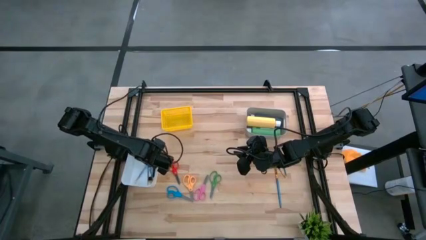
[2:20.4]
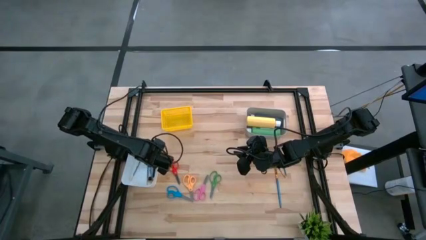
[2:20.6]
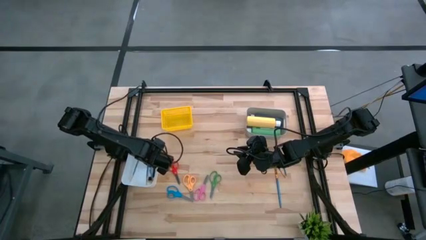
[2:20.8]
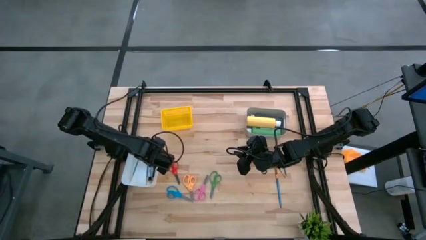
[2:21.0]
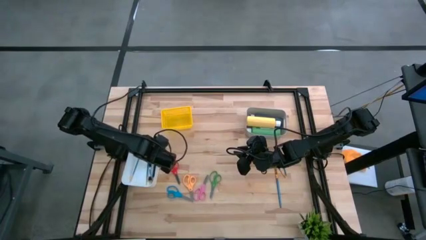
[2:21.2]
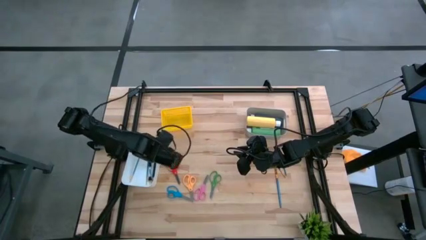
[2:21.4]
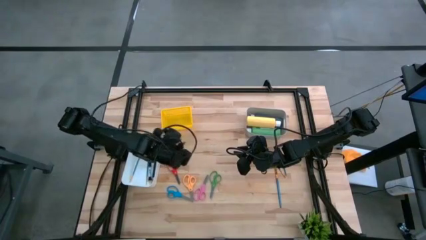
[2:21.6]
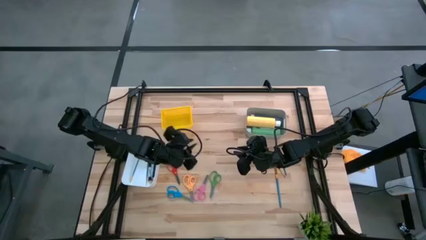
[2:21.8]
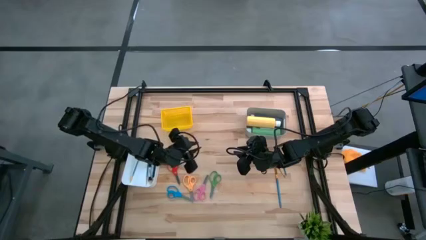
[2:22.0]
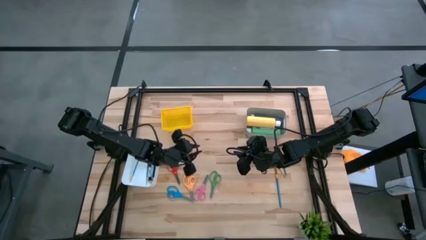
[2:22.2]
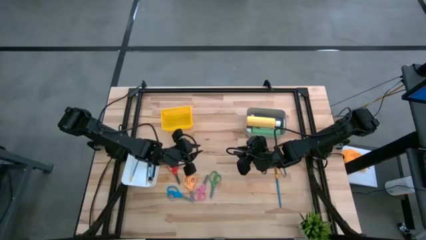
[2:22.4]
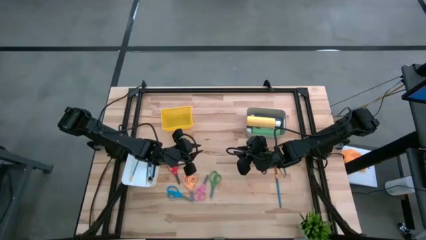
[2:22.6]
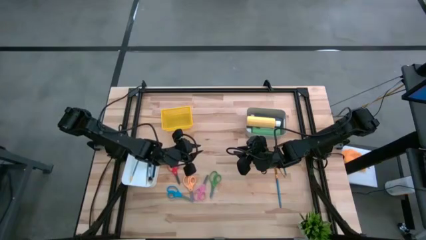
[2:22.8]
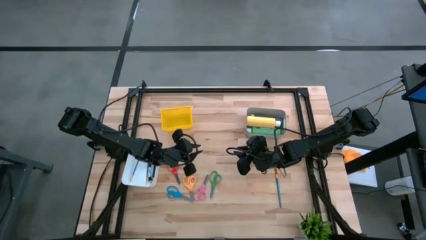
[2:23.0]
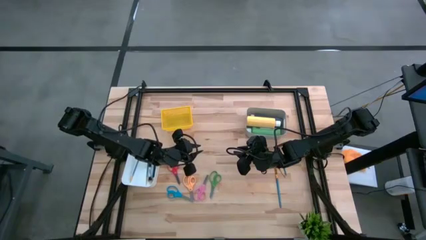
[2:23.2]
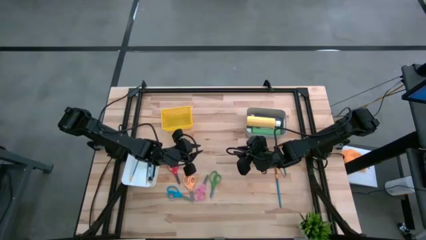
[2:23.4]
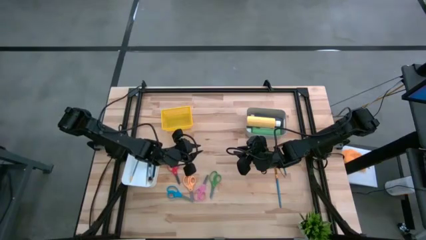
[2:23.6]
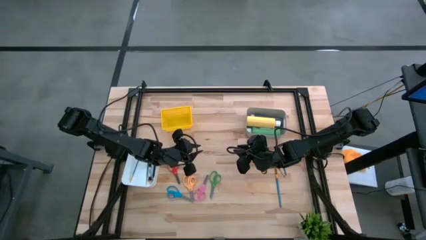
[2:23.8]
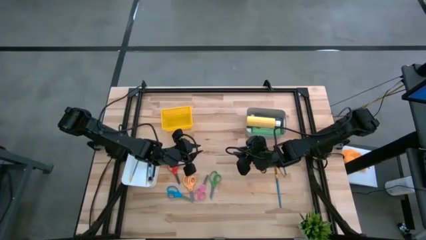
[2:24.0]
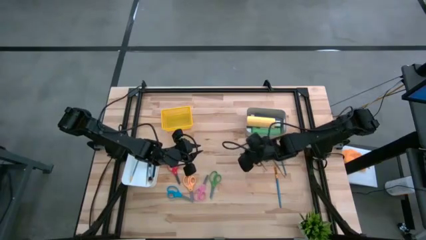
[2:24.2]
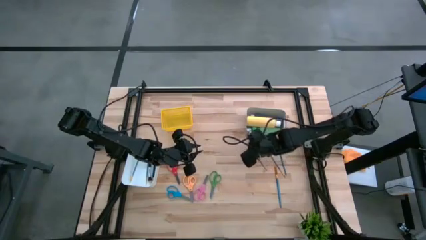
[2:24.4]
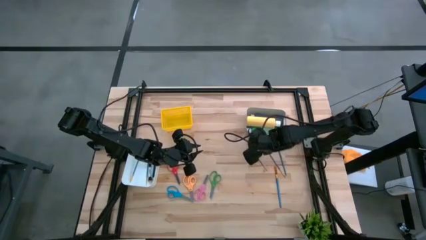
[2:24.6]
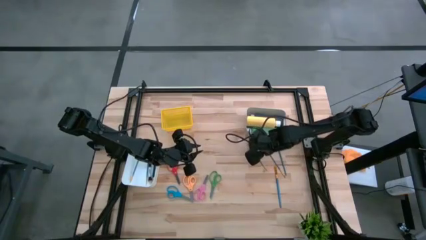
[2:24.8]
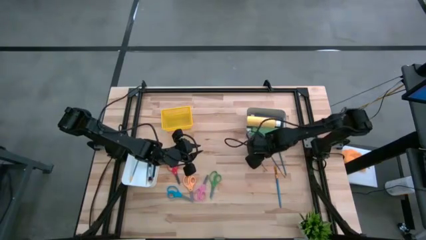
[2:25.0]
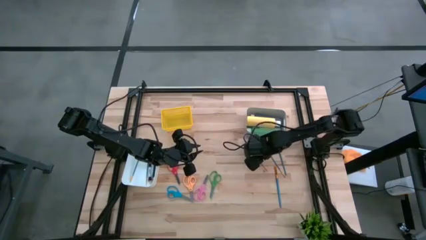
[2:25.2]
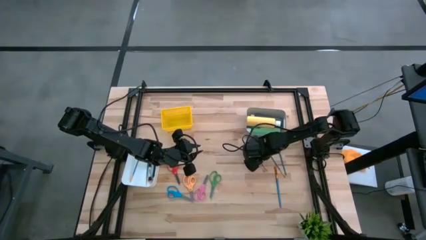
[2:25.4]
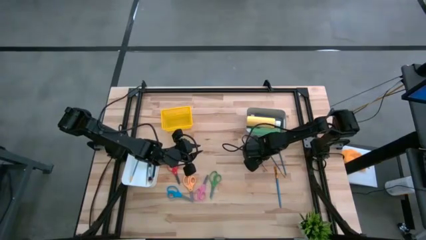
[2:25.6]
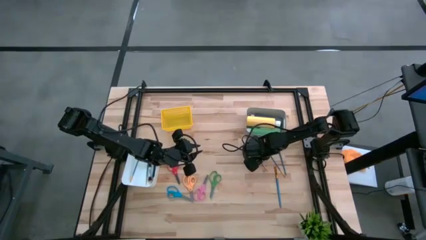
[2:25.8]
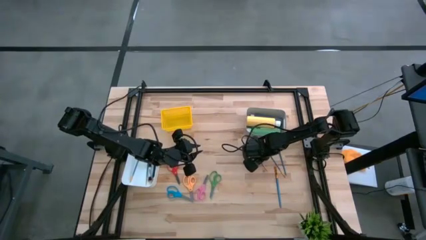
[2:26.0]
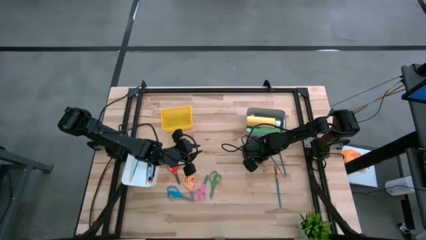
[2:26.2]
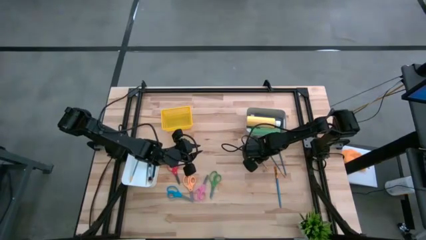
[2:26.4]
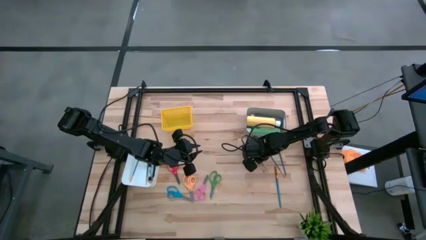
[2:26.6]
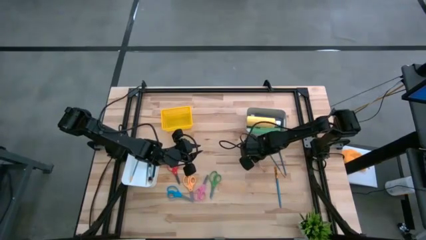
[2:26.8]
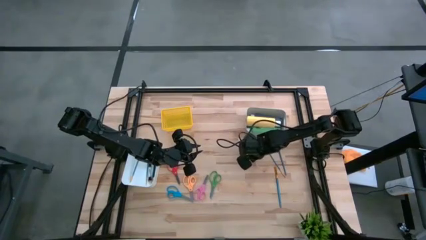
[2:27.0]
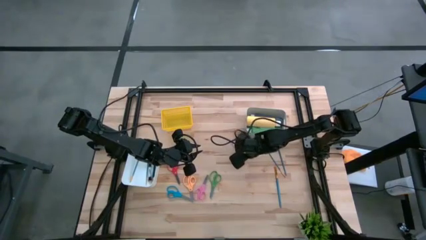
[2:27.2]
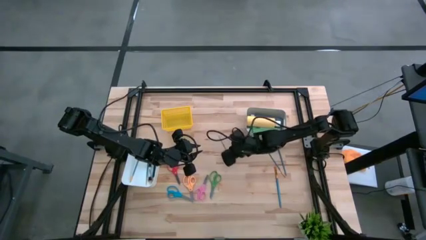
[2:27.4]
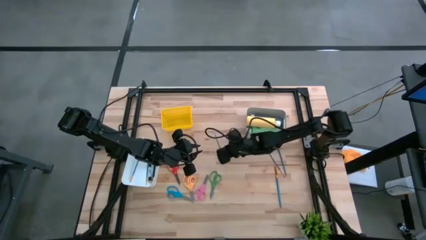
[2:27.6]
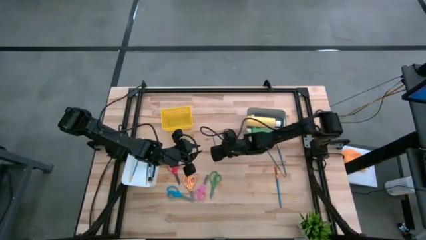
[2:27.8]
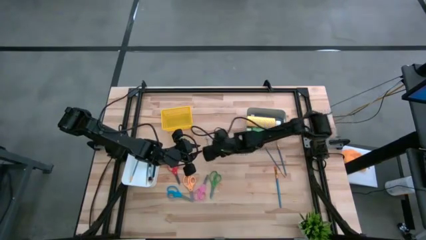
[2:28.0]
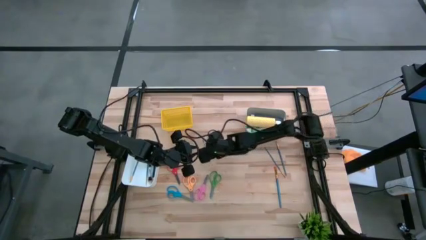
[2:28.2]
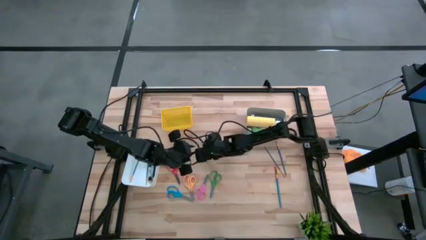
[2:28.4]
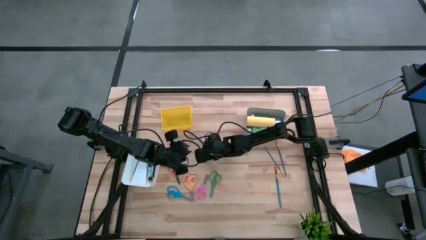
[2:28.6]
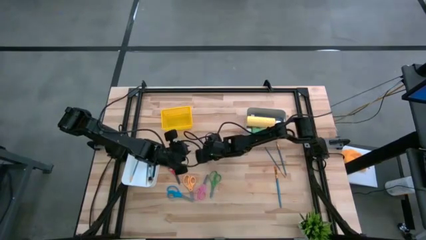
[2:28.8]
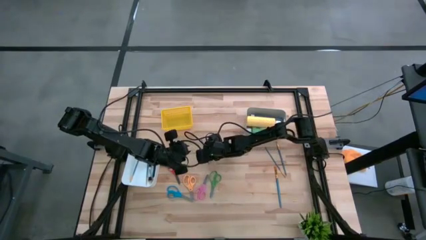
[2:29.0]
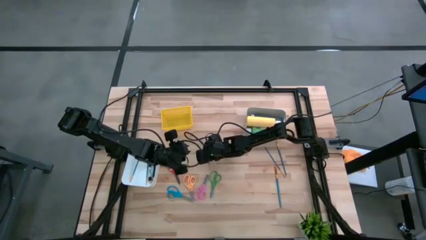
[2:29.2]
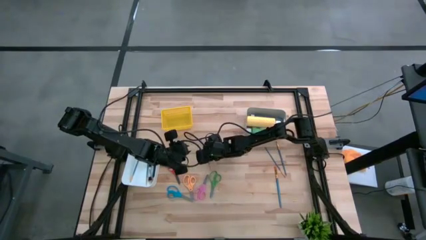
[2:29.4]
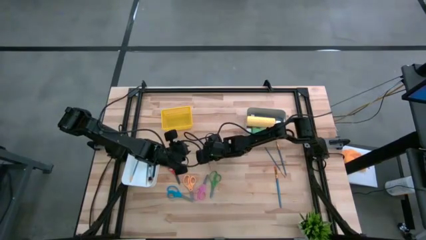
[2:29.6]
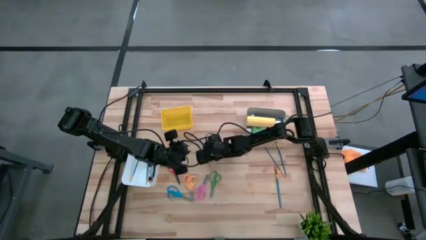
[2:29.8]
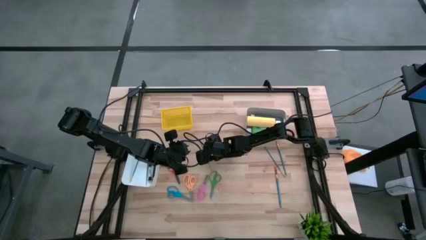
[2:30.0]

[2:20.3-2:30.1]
Task: Pick & Place Paint Supplies
Put the blue paintbrush into the white bin

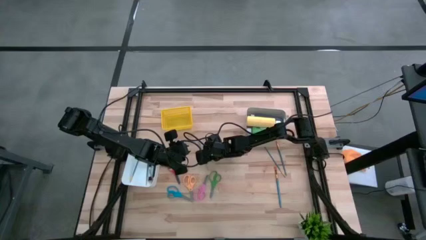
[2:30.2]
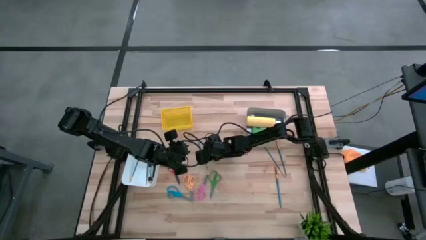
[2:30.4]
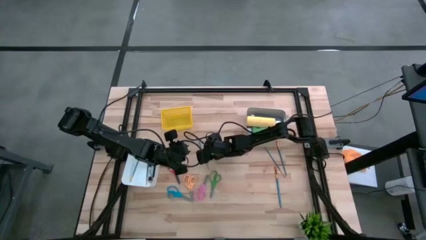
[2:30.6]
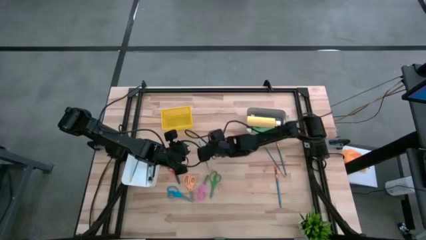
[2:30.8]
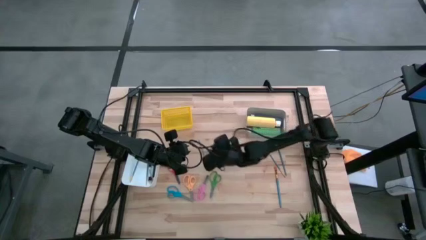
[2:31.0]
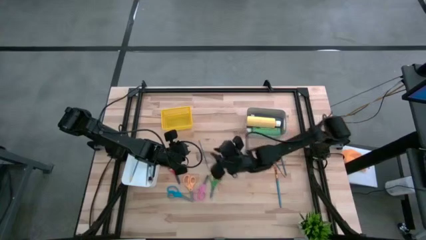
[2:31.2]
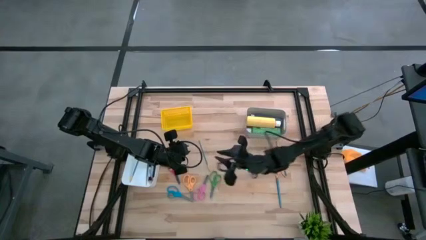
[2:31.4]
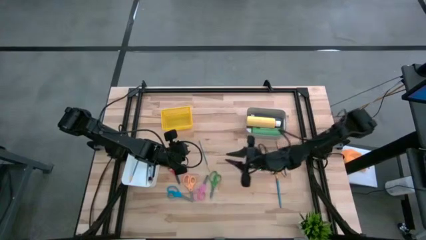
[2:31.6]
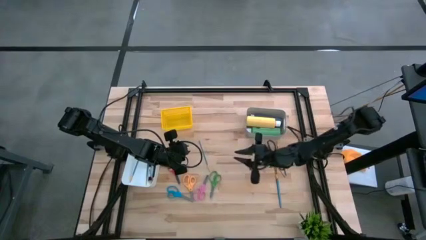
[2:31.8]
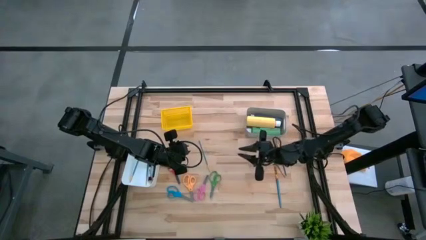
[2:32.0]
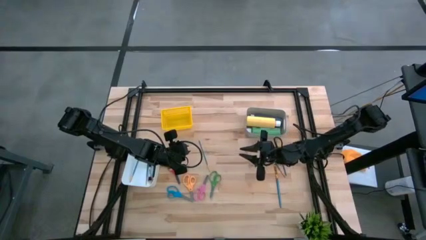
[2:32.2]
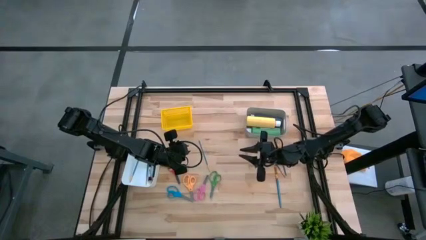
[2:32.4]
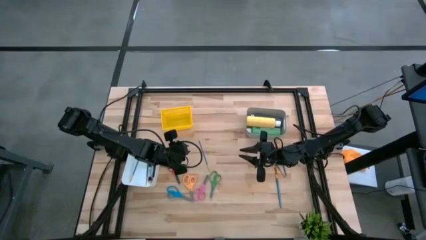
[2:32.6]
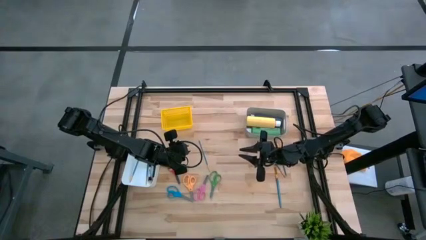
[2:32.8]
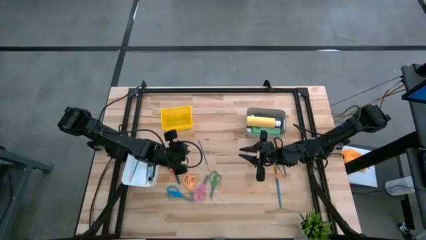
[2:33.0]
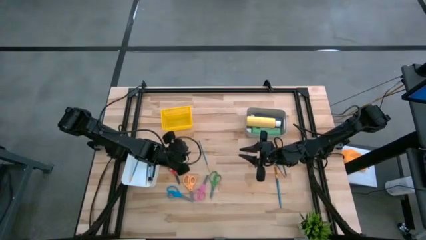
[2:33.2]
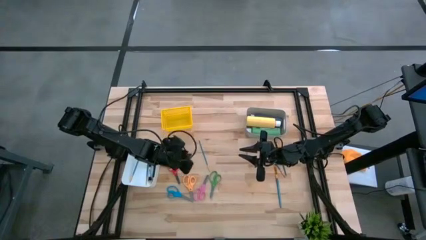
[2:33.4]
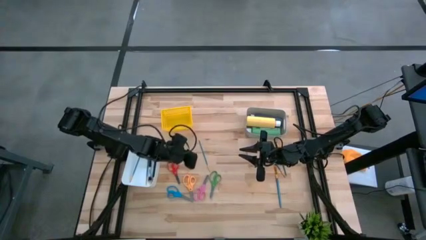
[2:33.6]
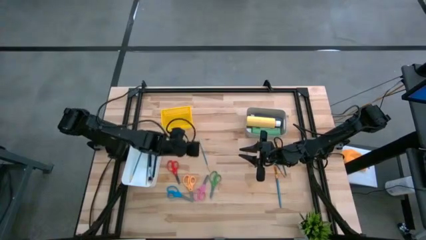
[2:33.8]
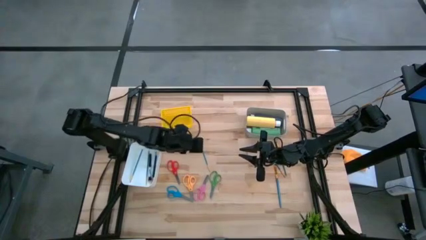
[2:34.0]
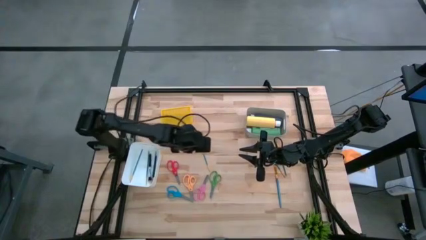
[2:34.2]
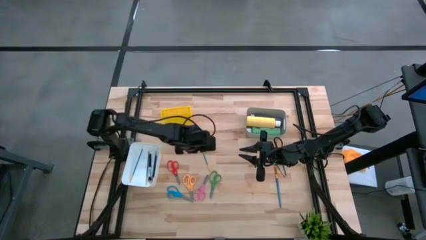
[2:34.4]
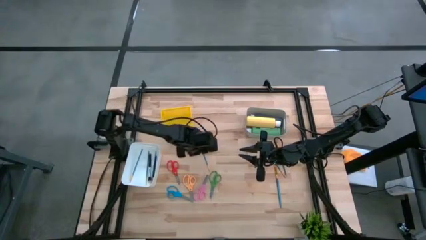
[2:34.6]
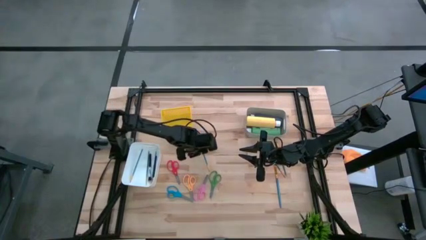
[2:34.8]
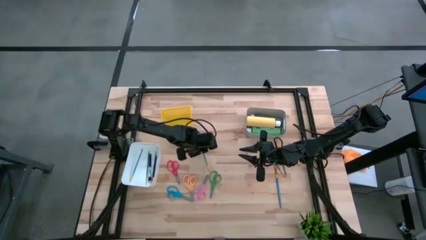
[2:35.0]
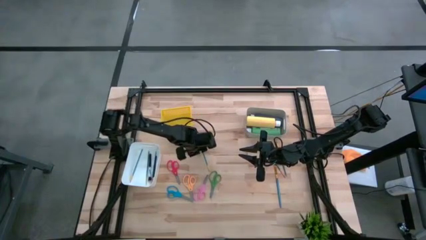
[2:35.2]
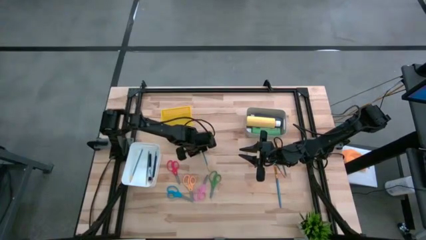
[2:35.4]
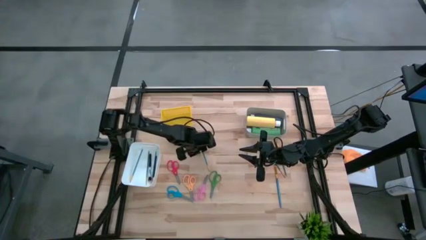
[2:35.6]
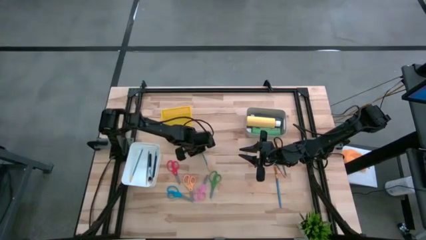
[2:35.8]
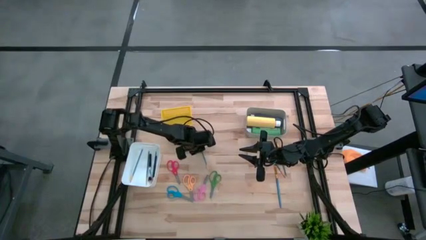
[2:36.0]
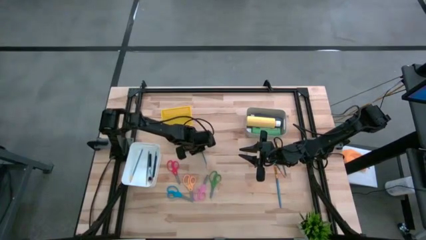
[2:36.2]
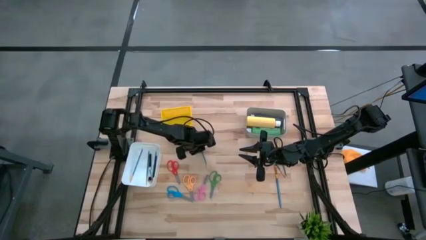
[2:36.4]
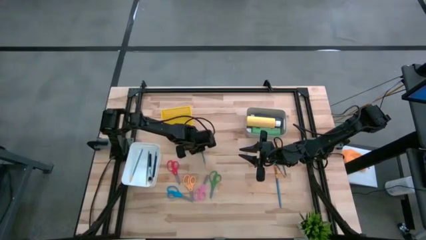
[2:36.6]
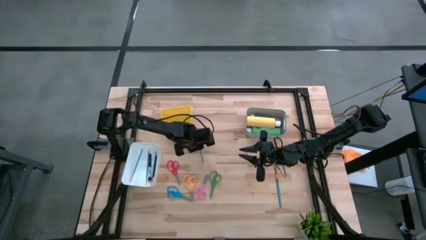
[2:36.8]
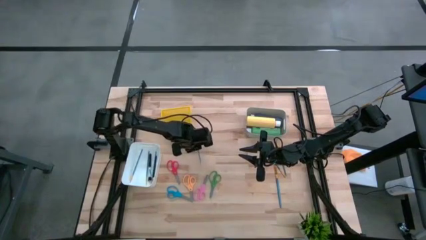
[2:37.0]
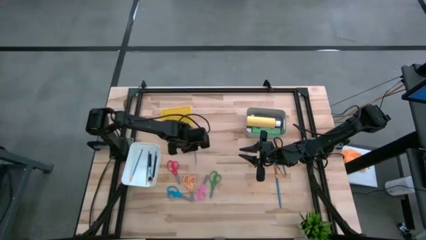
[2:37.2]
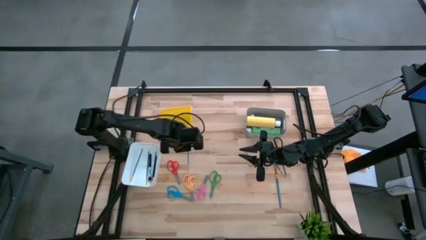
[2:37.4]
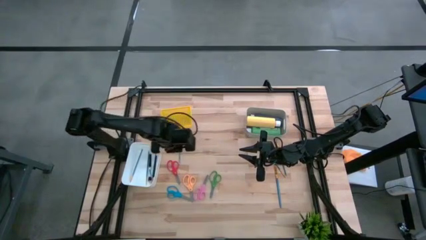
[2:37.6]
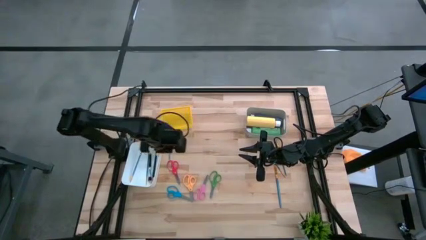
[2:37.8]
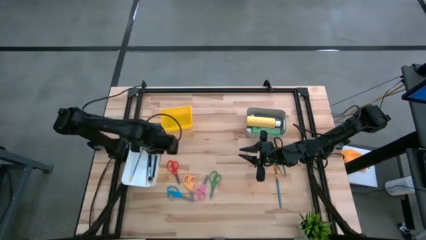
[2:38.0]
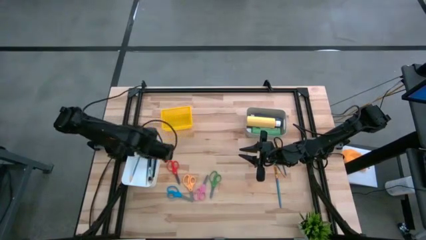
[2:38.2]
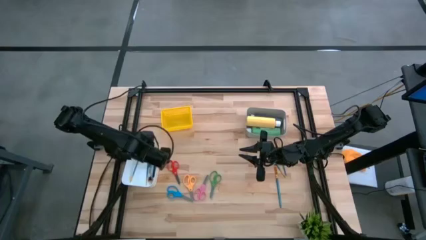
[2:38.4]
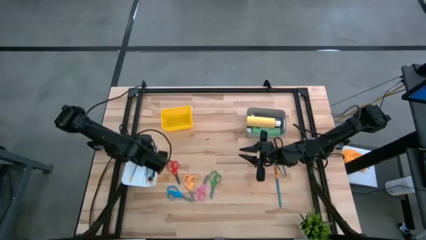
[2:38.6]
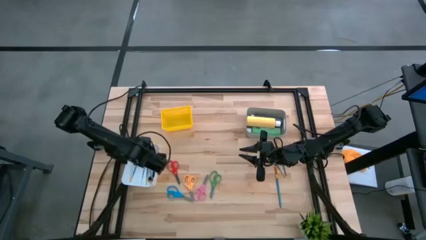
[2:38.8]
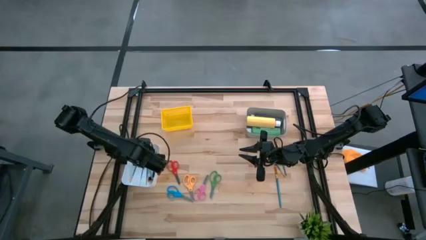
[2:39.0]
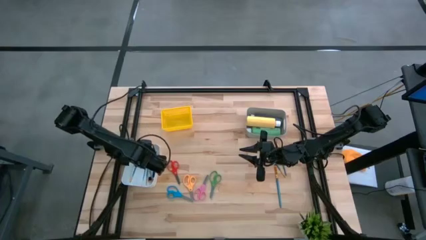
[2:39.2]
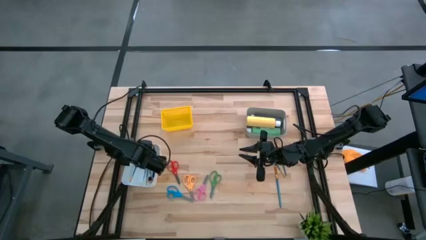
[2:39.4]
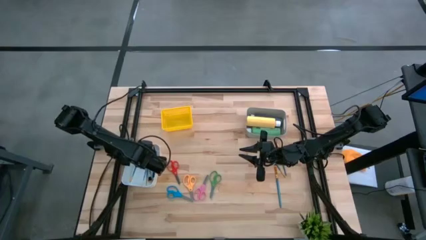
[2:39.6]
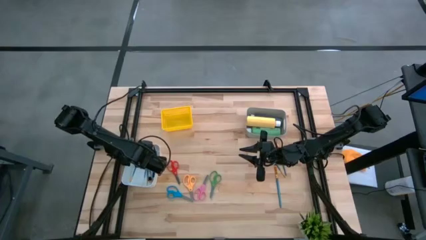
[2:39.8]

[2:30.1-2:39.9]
Put the blue paintbrush into the white bin
